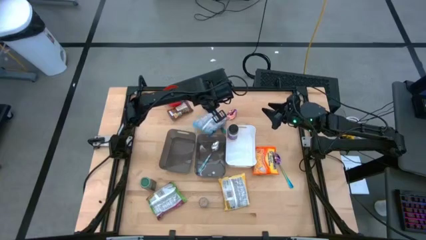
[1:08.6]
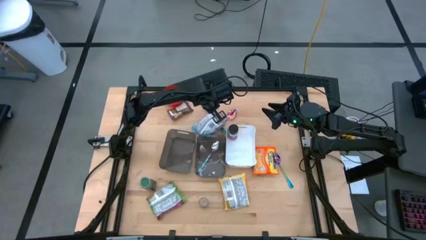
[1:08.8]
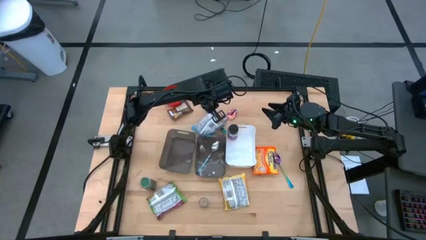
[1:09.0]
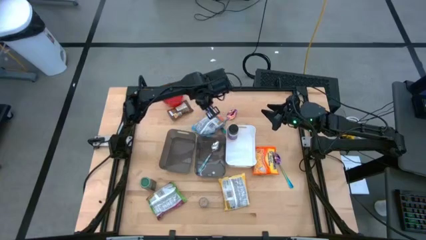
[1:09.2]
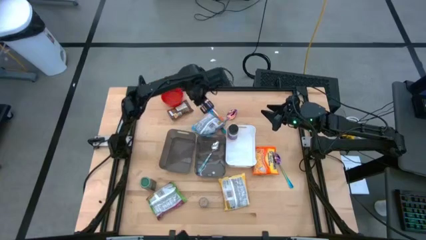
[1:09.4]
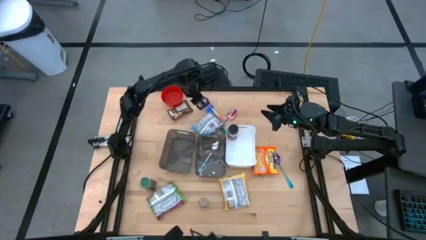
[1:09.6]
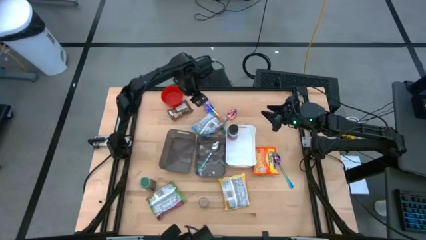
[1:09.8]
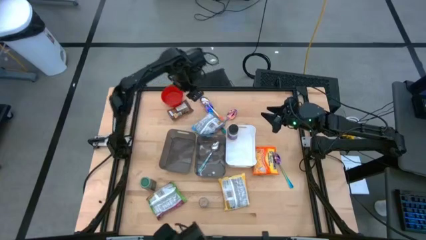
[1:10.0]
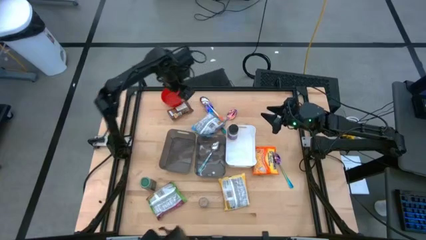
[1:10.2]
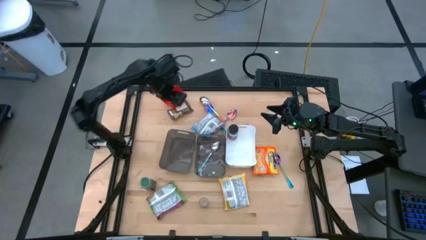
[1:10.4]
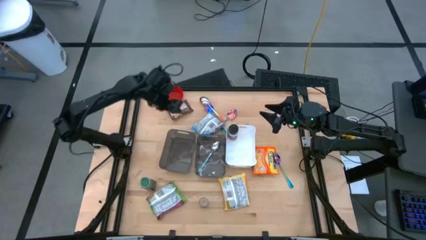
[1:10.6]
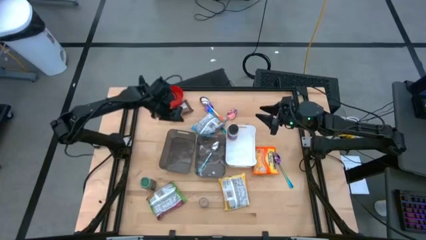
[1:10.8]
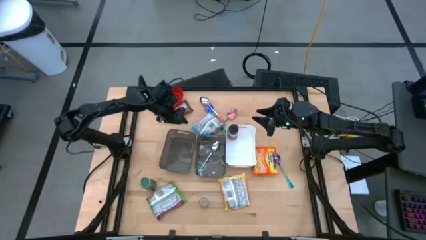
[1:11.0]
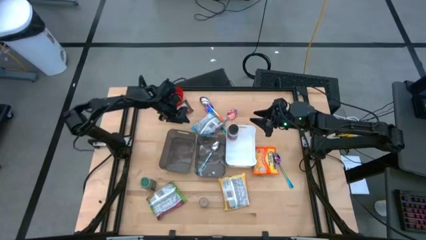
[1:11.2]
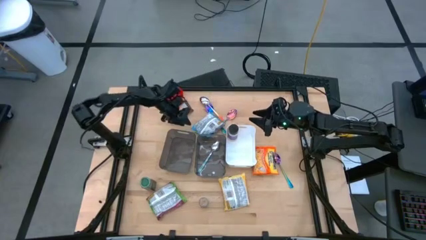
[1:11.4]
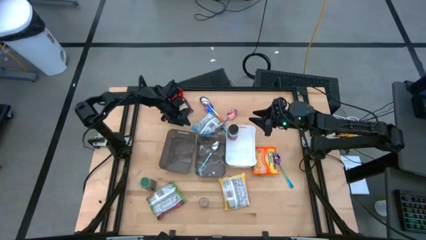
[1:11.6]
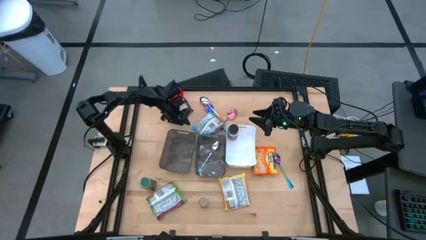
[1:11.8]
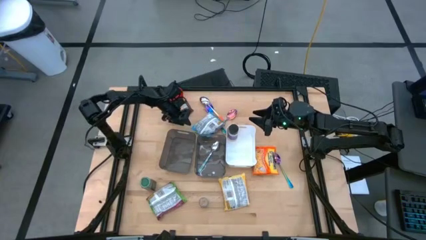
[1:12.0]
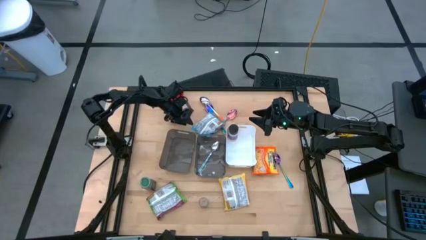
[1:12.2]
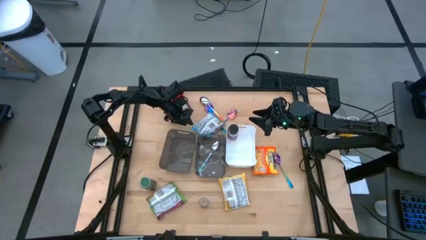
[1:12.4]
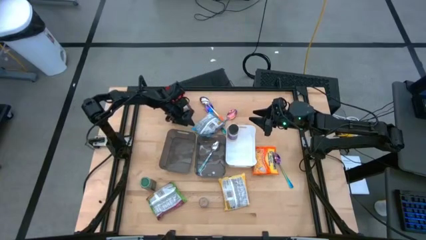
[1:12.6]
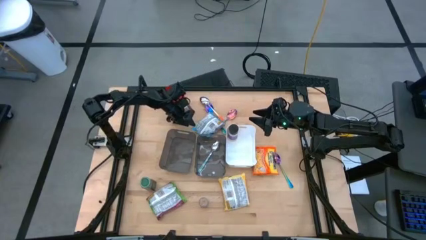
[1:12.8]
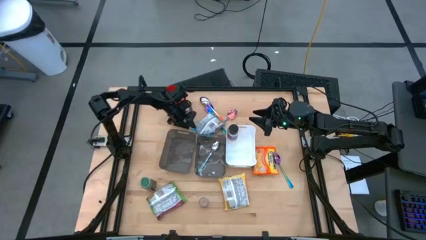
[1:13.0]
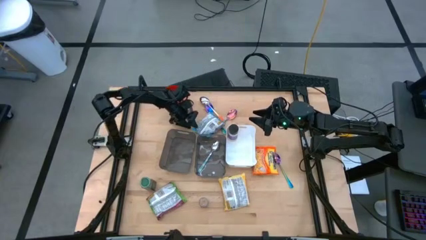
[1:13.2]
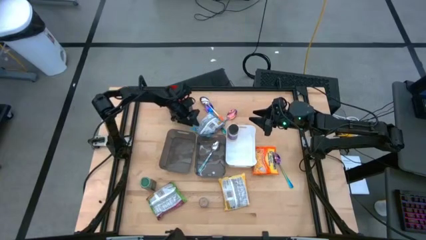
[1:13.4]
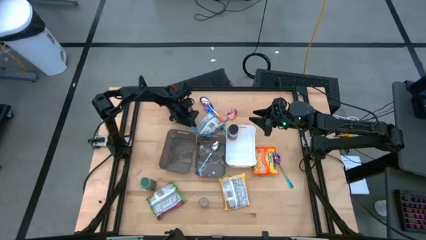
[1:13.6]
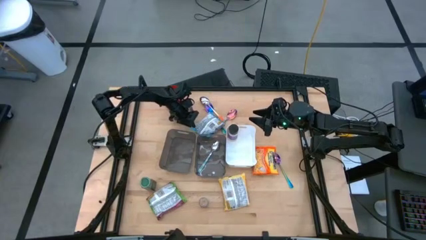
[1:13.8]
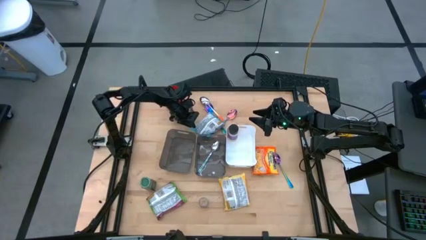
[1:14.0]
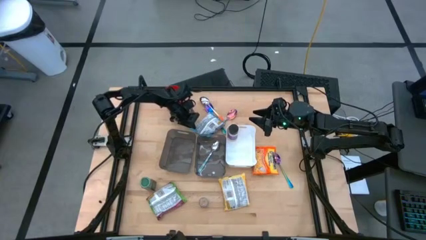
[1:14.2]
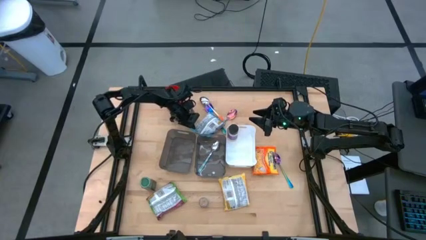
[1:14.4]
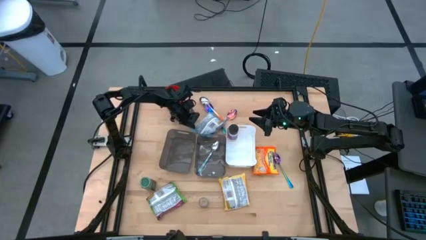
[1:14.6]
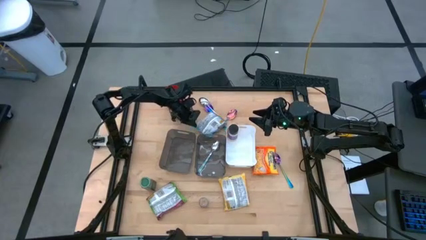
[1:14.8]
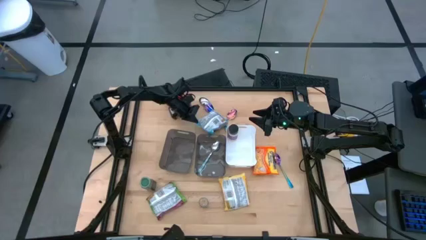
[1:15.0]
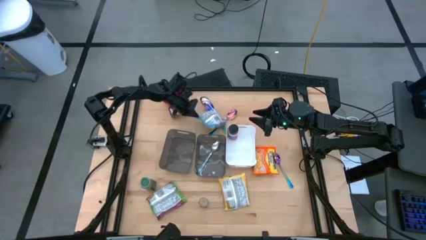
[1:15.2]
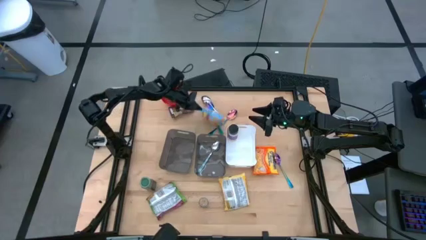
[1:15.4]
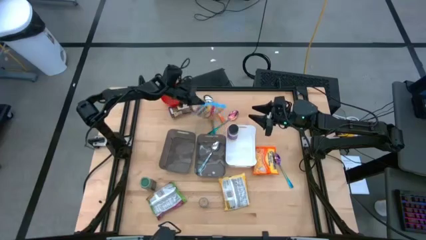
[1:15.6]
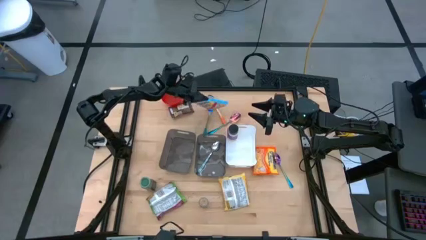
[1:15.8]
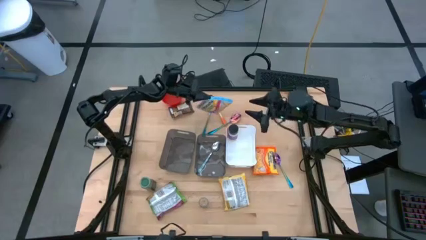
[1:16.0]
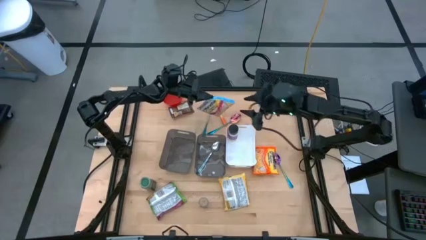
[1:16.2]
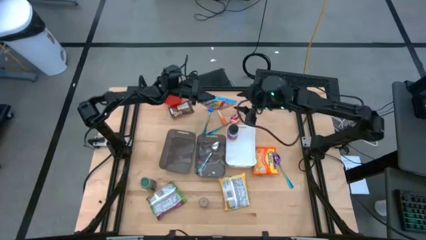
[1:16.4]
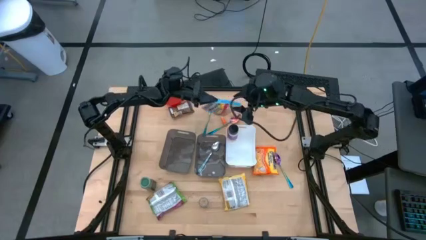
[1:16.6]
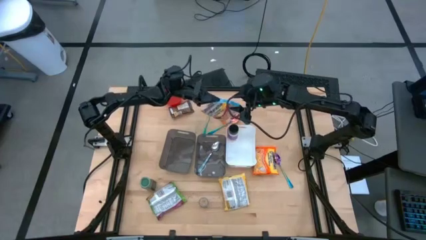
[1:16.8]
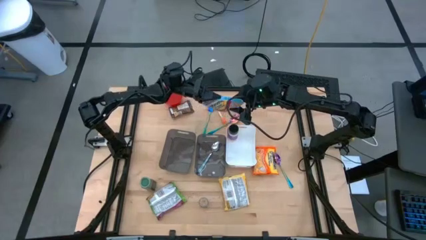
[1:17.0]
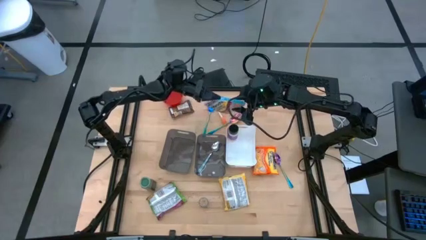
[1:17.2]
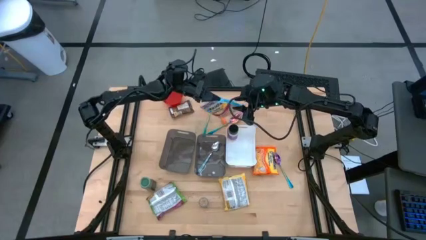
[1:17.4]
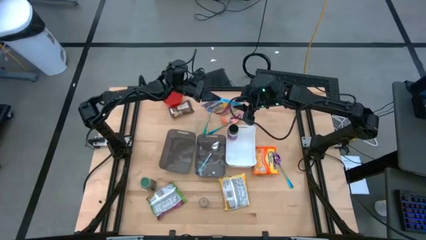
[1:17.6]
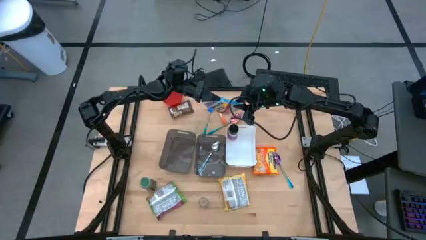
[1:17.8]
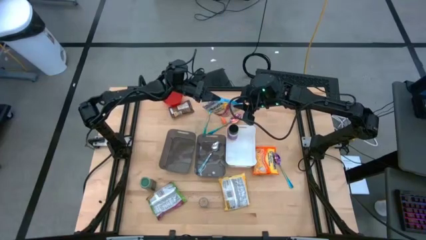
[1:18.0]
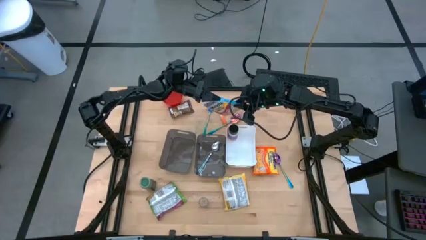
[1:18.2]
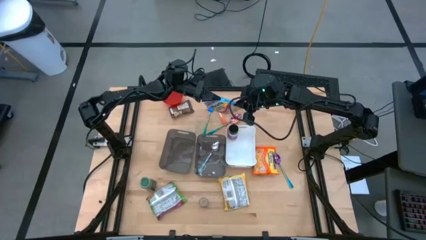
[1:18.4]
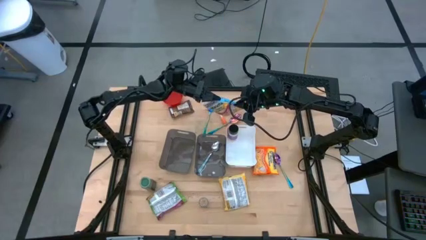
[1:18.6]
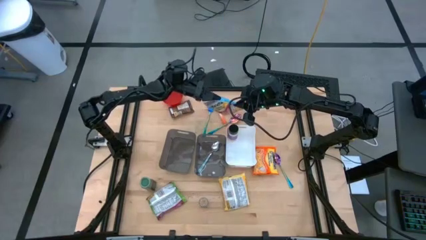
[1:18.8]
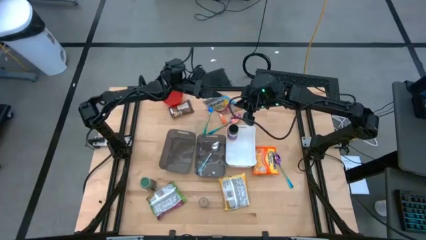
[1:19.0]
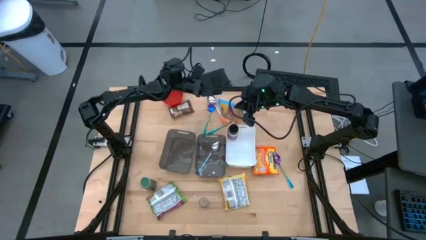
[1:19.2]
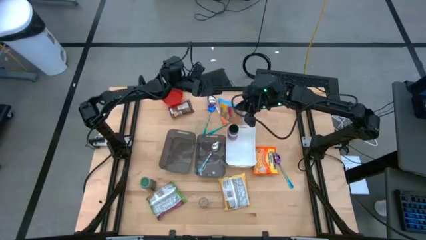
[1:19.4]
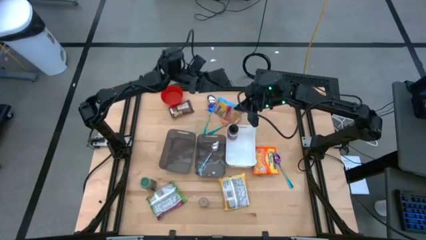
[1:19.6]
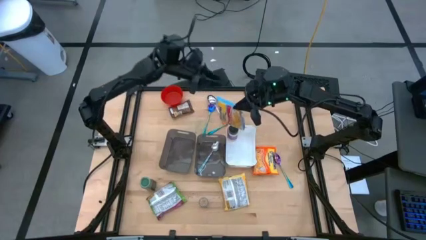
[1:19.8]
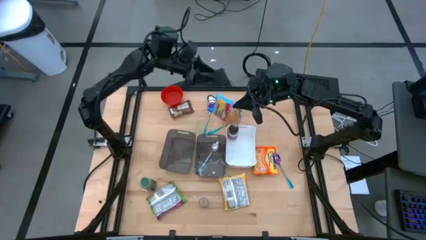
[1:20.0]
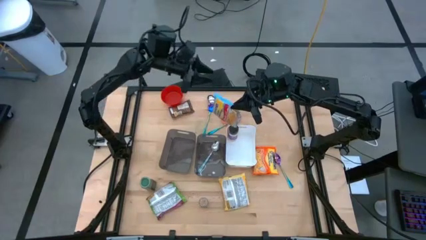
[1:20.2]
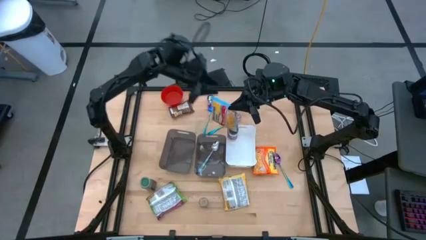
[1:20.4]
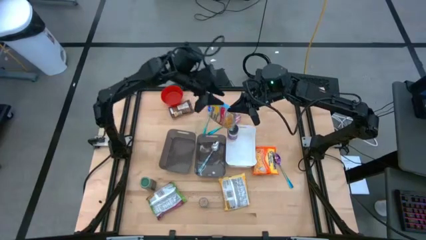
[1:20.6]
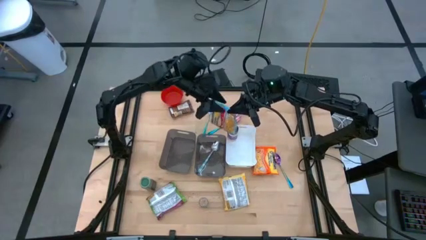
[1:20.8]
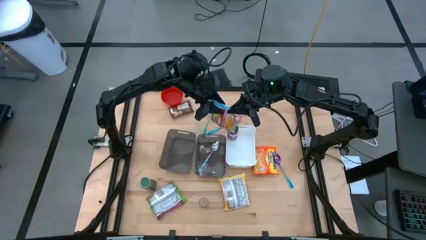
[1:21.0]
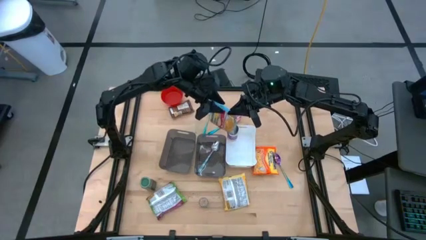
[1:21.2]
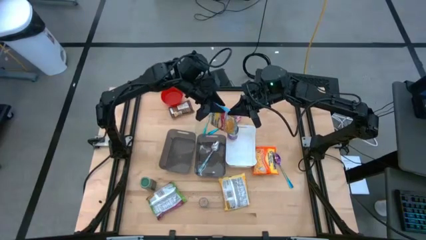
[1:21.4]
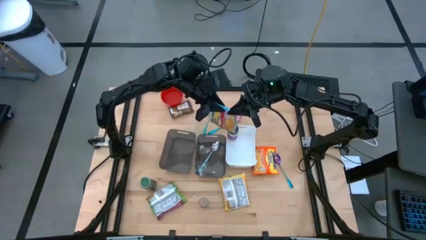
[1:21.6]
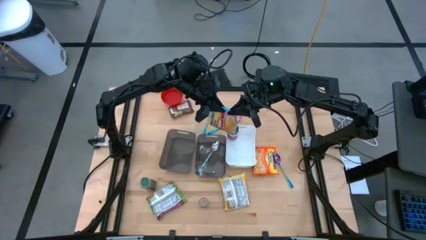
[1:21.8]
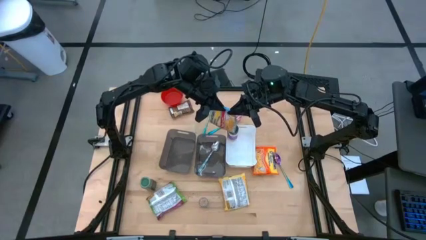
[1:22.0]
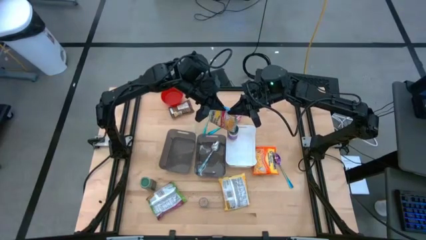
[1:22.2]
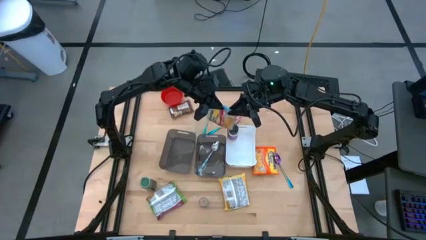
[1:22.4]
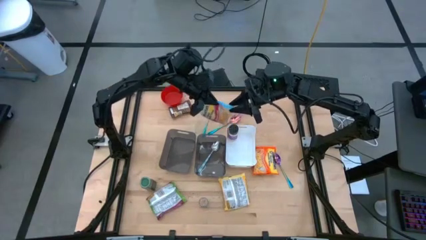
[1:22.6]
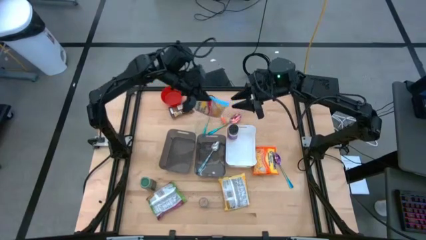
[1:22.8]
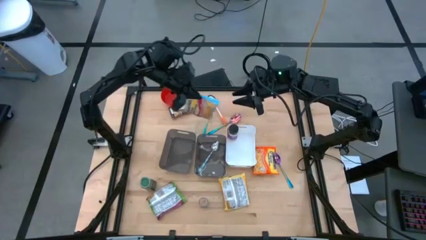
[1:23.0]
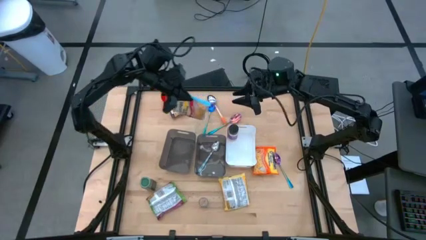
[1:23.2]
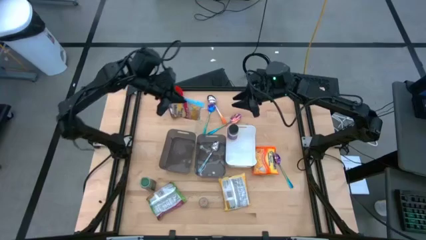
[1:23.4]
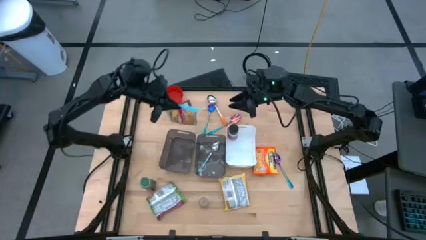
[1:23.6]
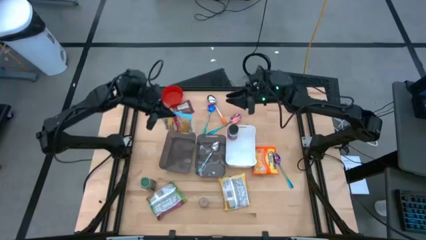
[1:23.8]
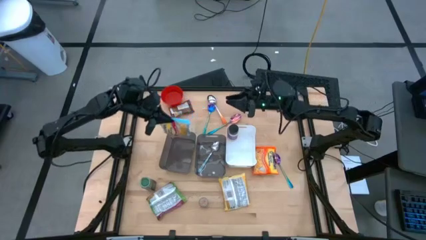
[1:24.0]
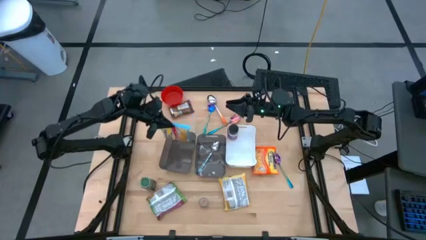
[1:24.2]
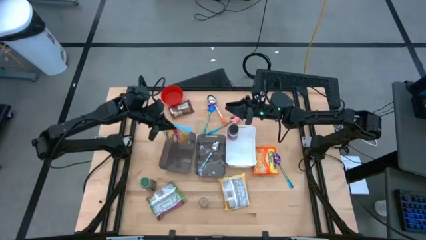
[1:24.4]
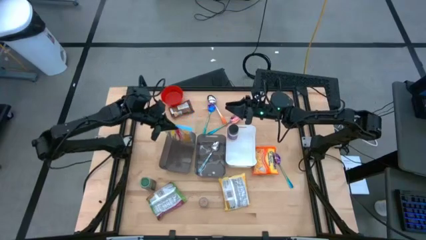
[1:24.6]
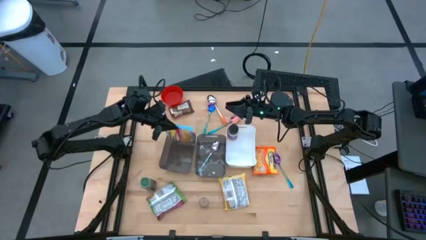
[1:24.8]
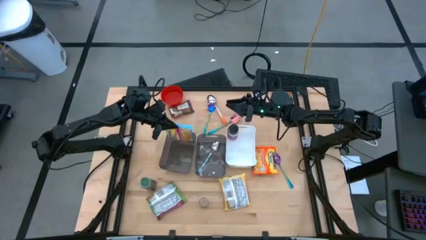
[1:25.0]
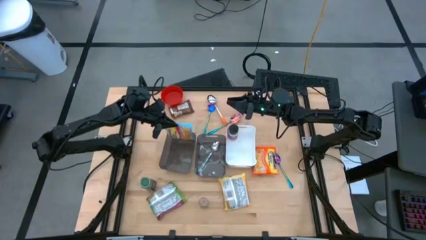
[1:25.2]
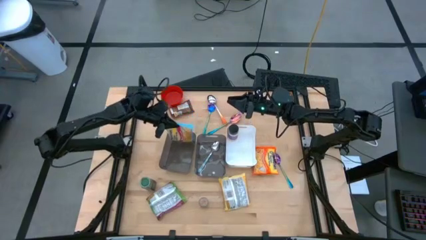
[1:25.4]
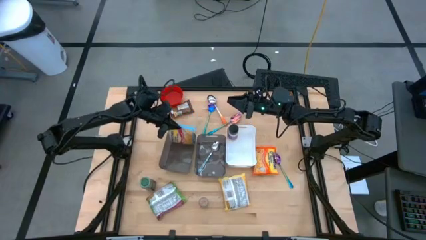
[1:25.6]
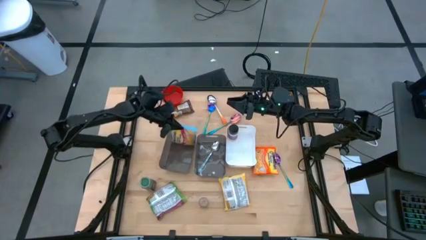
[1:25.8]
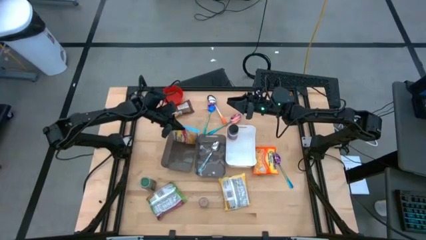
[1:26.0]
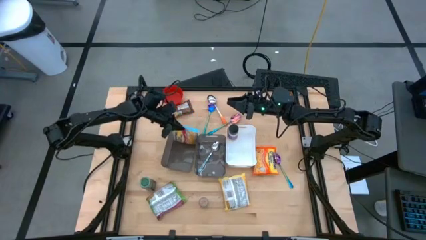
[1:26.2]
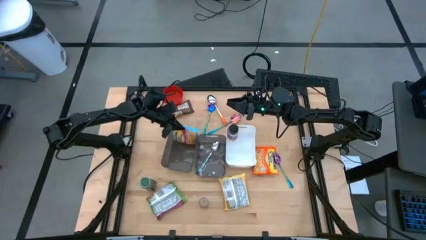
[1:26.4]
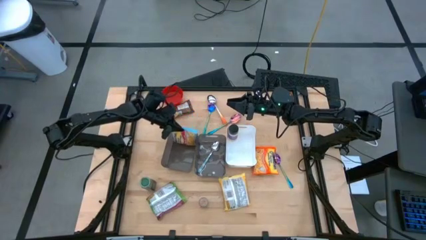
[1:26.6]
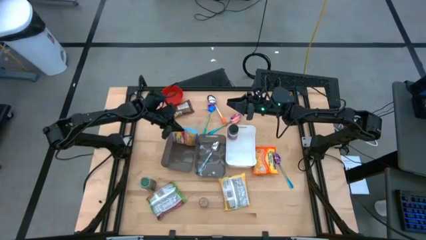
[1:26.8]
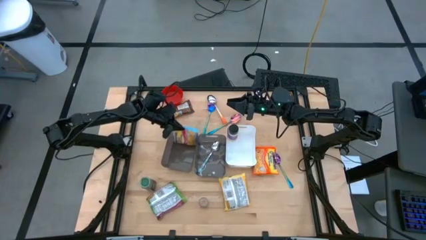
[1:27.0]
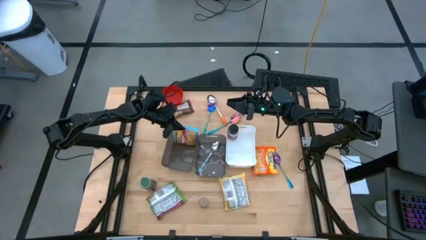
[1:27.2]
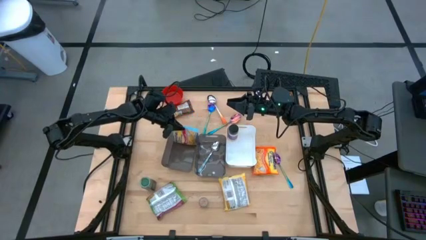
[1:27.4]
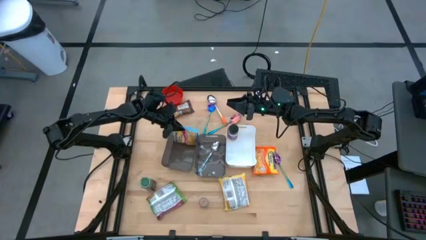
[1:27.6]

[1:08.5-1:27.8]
Task: Pick & Place Food Item
Put the blue pack into the left gray bin
